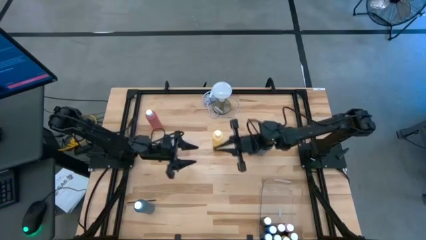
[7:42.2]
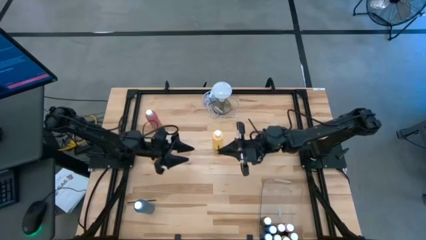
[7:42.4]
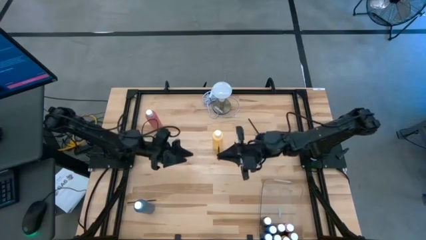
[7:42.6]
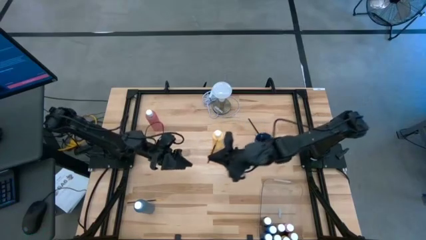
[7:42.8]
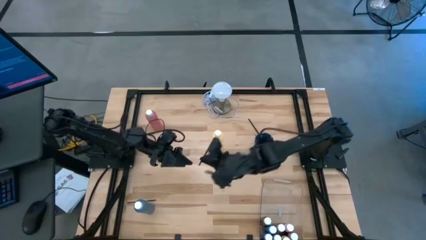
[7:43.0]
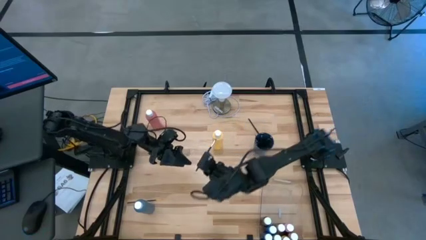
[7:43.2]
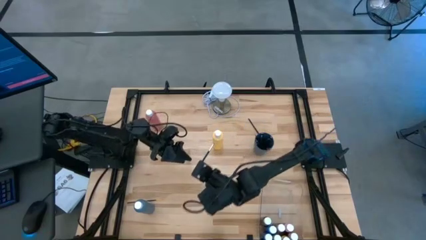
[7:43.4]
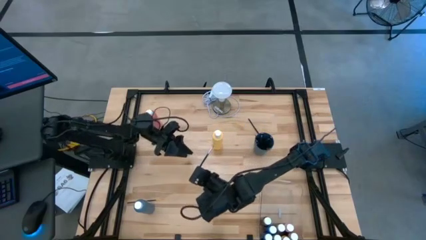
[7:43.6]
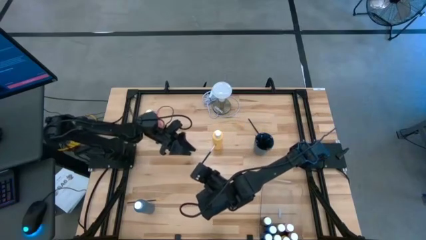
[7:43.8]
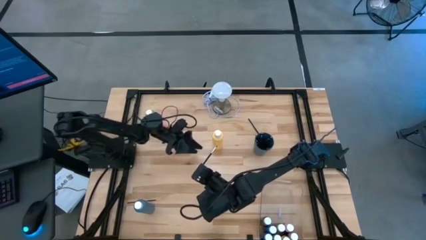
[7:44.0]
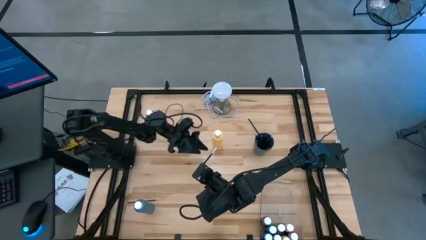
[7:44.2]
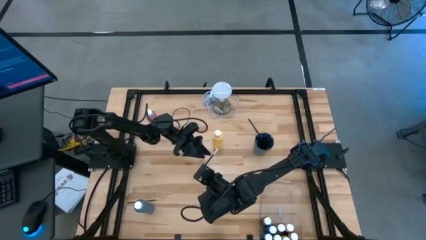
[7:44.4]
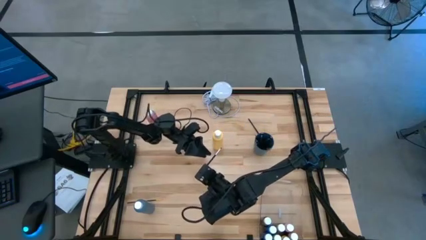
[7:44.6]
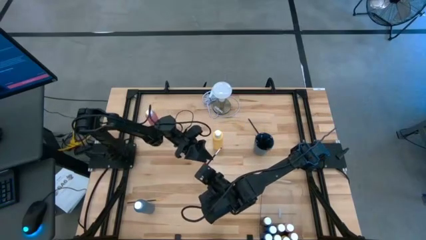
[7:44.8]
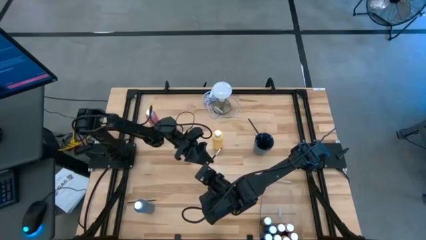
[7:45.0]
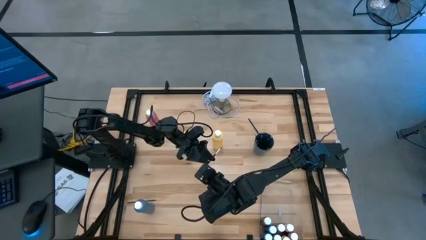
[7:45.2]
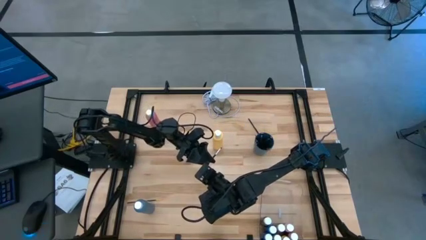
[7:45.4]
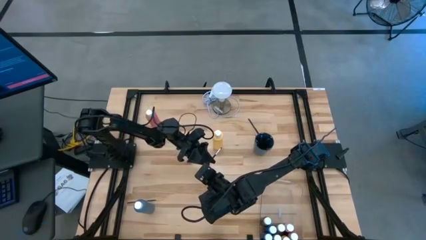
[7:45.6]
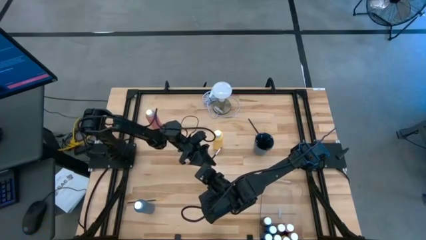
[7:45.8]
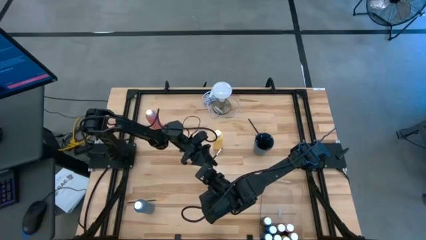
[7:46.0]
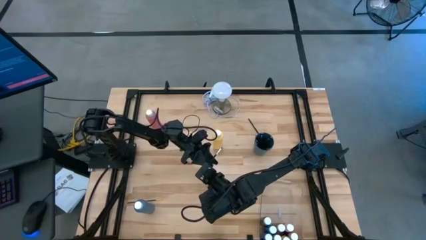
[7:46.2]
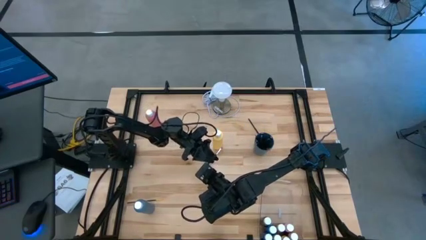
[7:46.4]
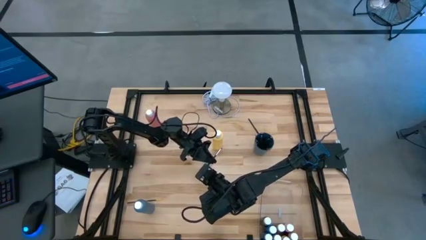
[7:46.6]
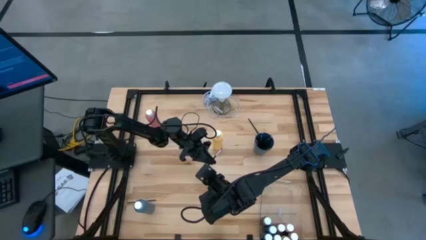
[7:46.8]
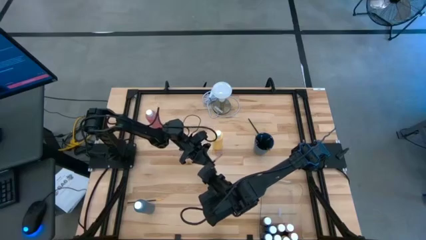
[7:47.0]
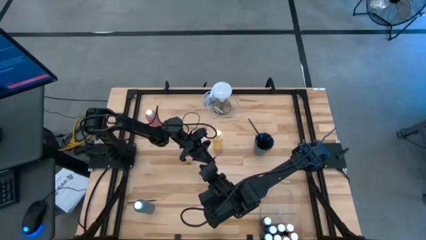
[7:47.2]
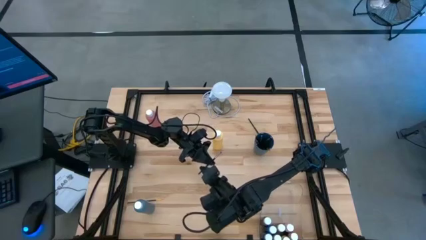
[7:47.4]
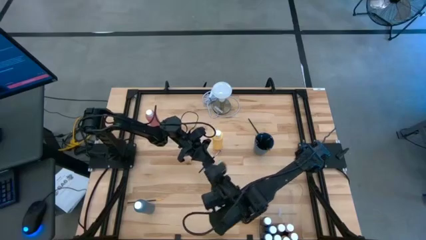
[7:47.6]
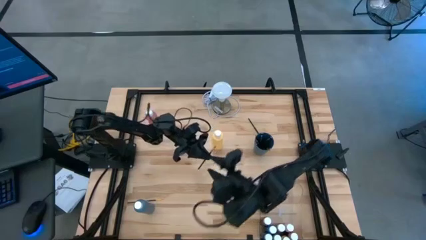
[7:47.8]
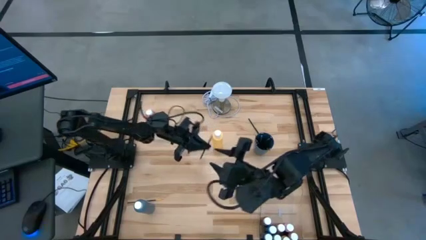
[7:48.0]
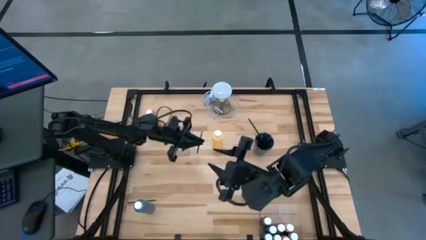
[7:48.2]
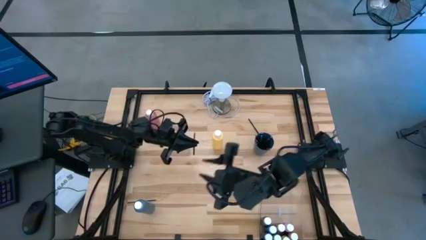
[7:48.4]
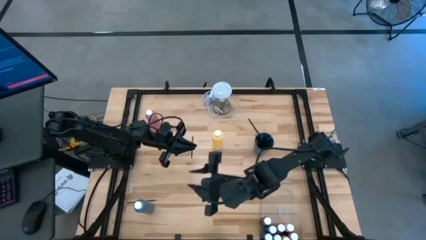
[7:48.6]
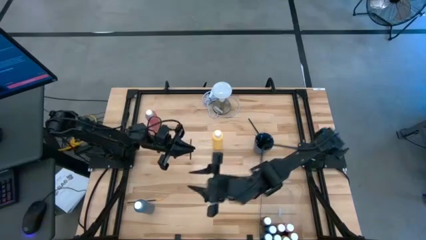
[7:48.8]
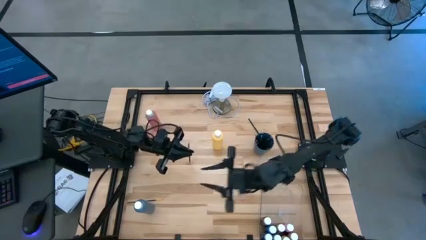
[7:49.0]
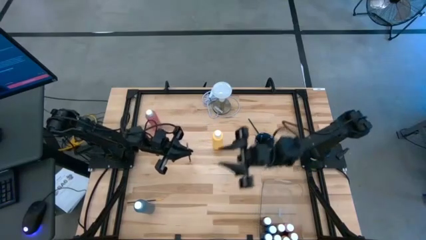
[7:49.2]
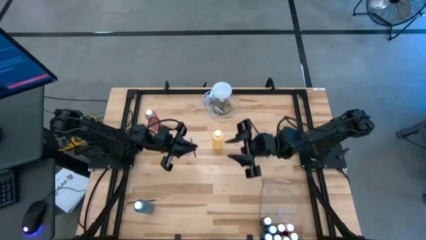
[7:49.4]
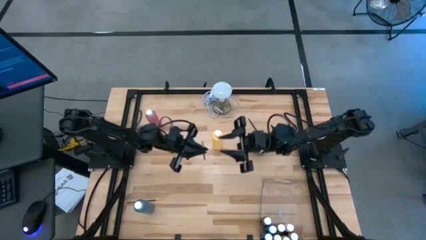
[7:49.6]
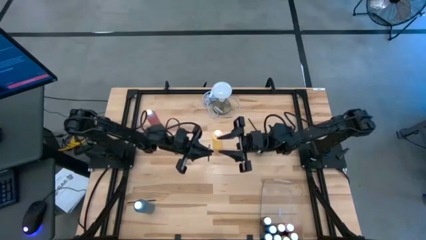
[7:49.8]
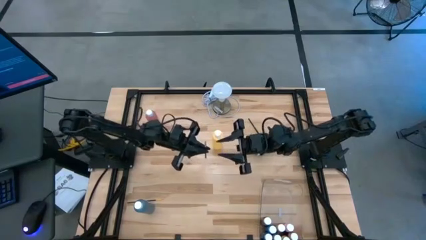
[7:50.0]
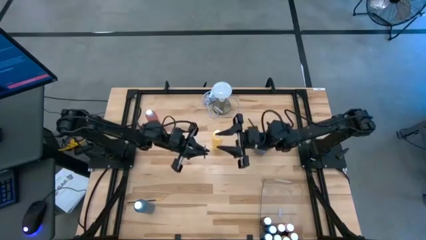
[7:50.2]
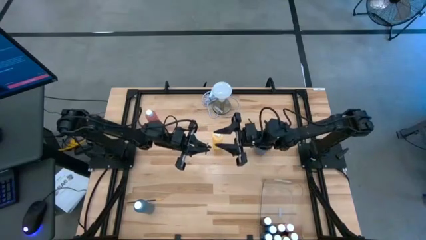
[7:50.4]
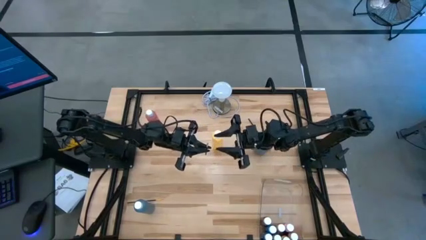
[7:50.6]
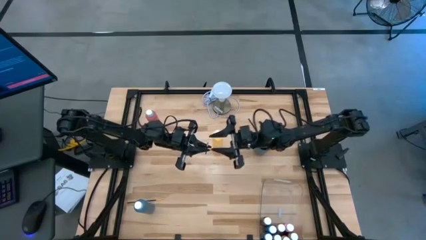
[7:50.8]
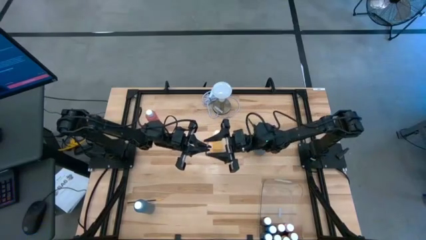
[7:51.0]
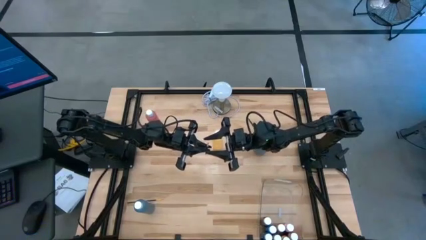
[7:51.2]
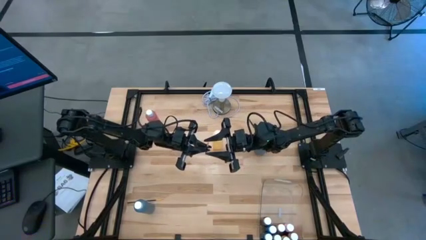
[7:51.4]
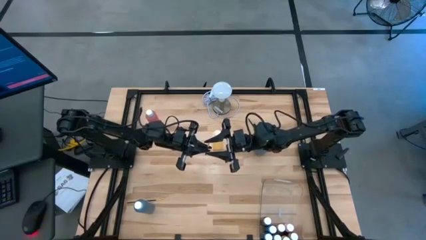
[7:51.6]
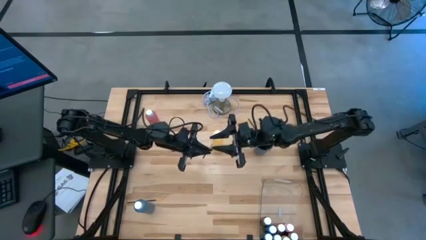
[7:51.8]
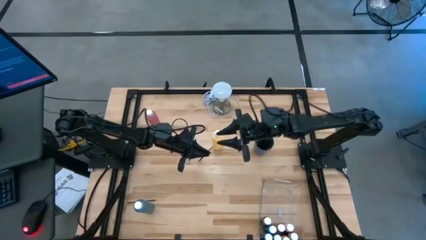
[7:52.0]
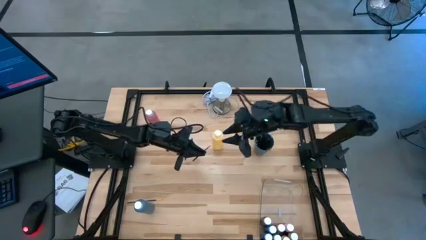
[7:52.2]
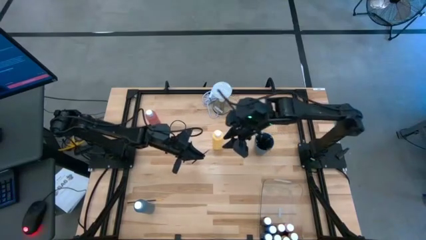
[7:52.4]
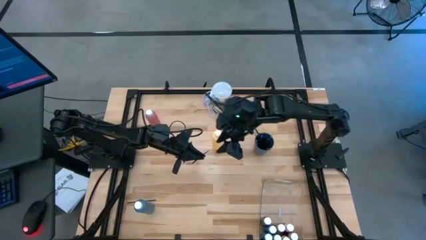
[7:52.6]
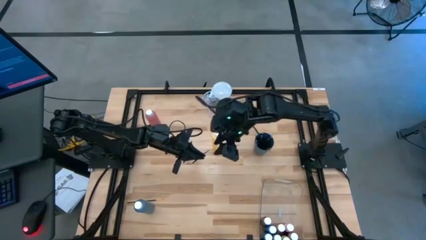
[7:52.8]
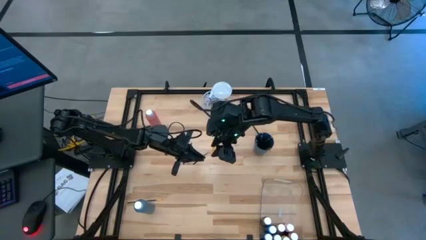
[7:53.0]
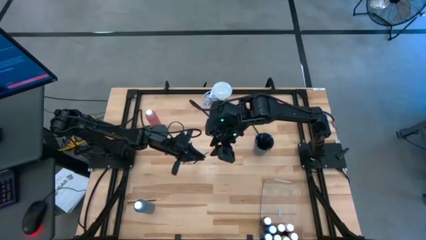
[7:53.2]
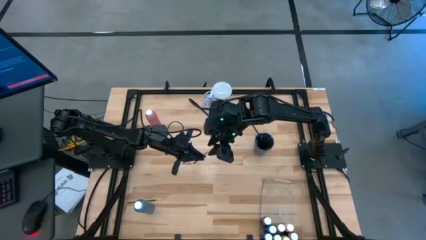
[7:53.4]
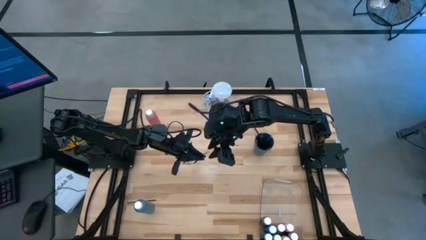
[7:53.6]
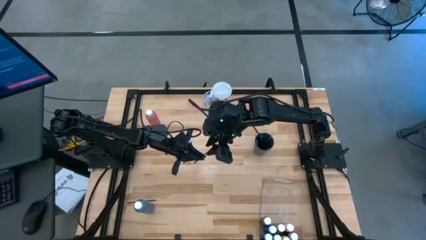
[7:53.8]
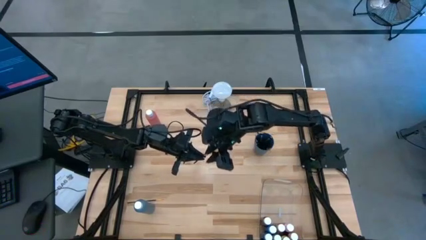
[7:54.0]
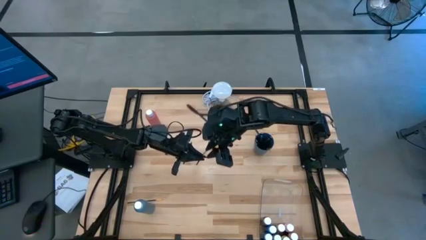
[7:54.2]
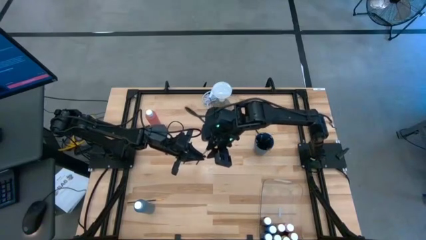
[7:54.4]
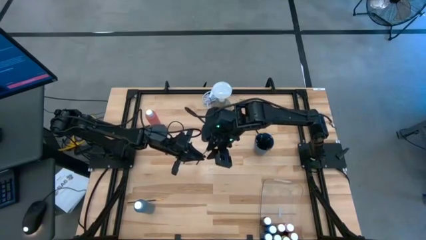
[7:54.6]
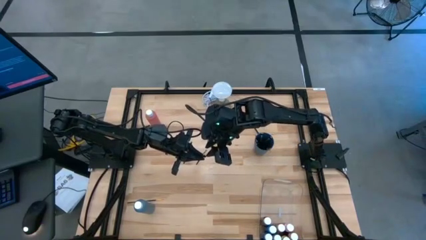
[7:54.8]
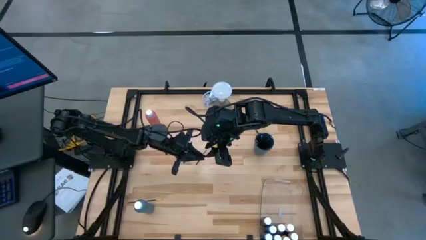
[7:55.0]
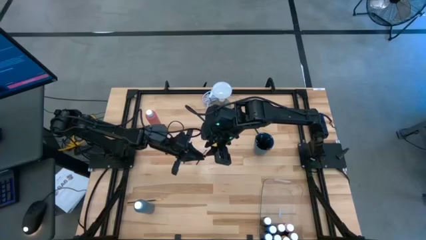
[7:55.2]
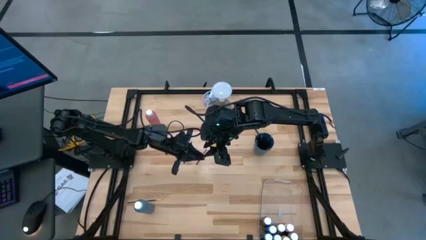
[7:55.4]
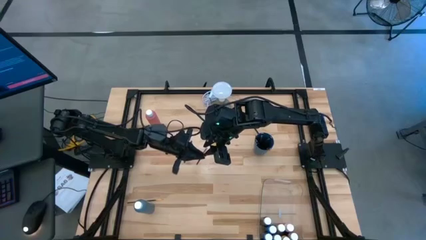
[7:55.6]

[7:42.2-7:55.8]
Task: Pick & Place Paint Supplies
Put the left black silver paintbrush into the blue cup
